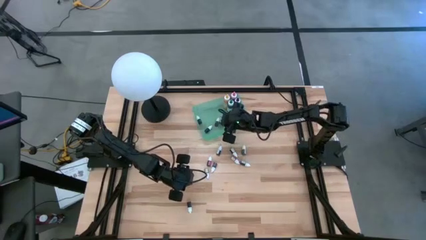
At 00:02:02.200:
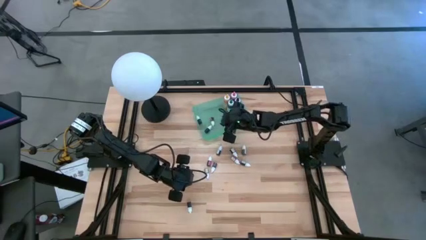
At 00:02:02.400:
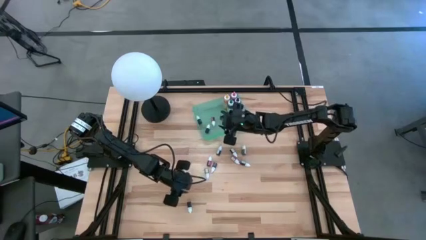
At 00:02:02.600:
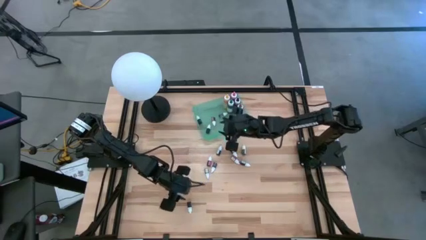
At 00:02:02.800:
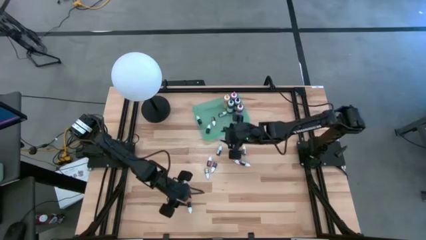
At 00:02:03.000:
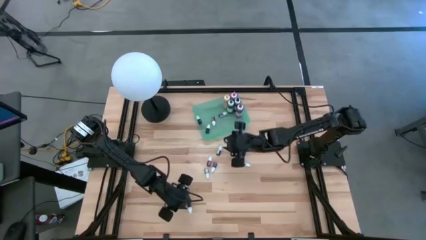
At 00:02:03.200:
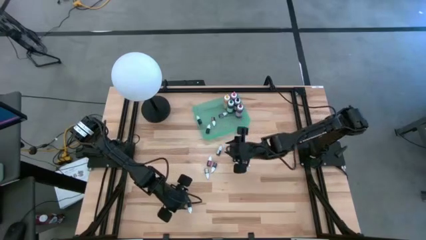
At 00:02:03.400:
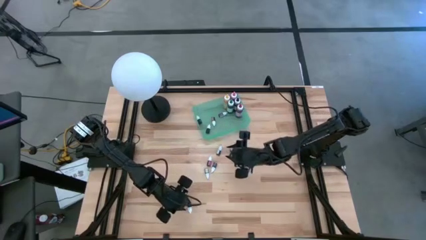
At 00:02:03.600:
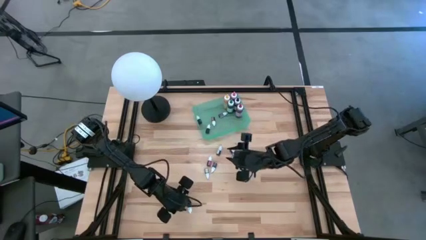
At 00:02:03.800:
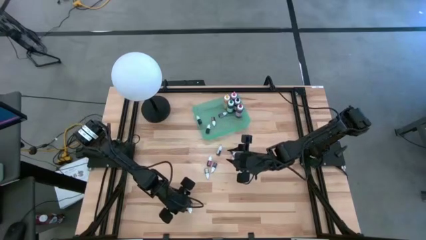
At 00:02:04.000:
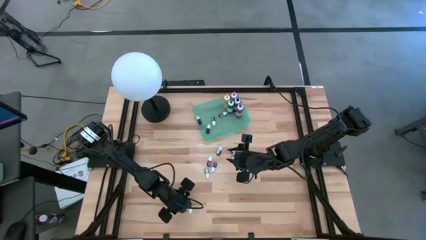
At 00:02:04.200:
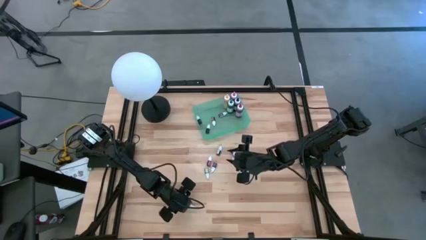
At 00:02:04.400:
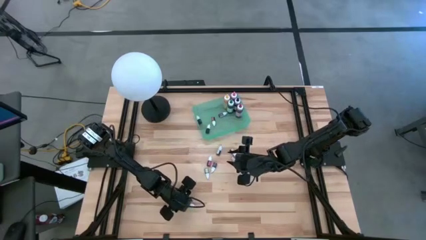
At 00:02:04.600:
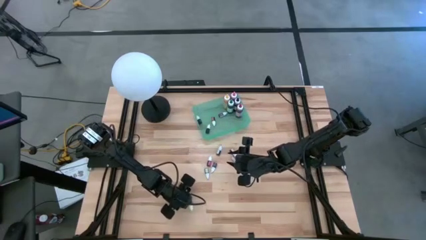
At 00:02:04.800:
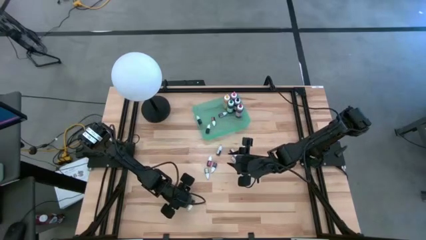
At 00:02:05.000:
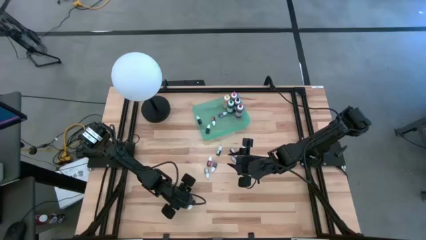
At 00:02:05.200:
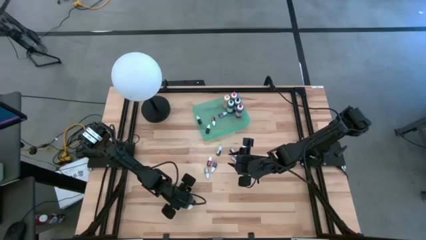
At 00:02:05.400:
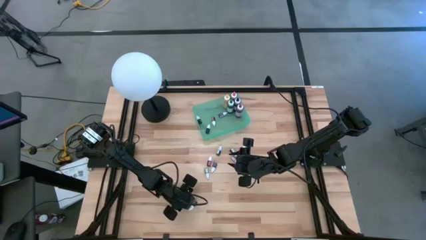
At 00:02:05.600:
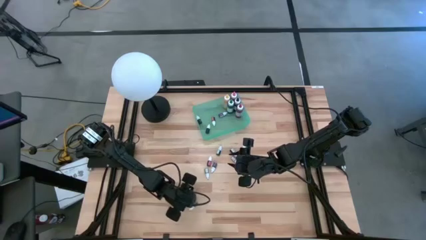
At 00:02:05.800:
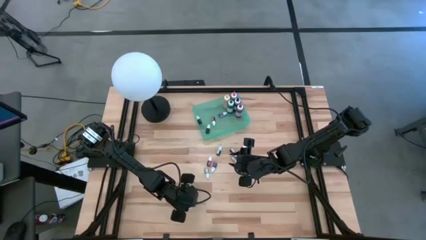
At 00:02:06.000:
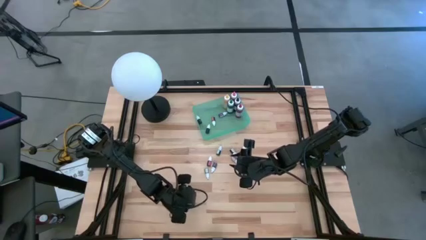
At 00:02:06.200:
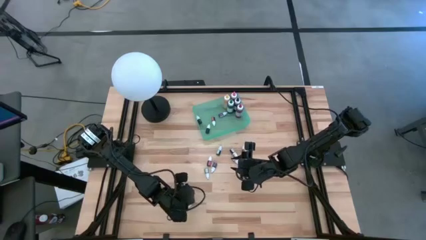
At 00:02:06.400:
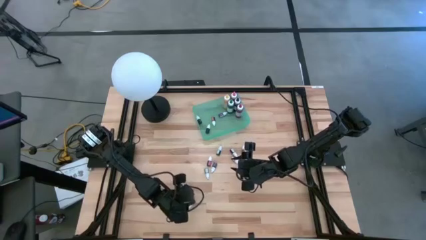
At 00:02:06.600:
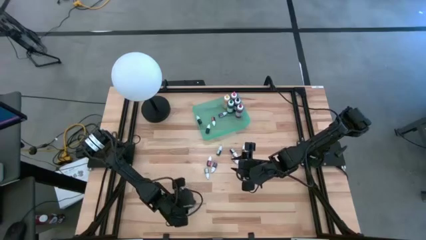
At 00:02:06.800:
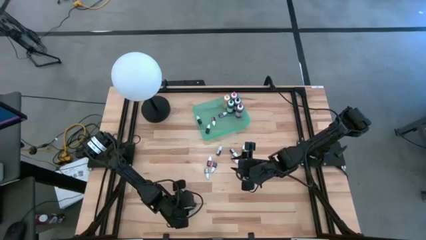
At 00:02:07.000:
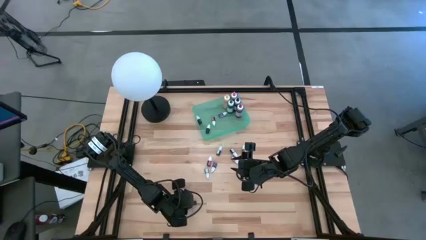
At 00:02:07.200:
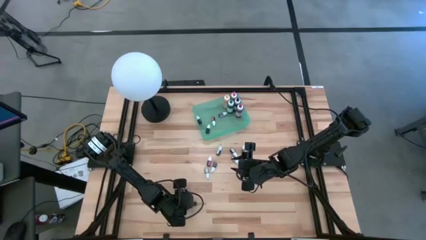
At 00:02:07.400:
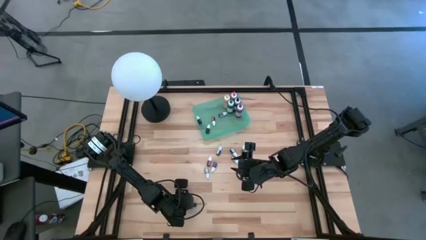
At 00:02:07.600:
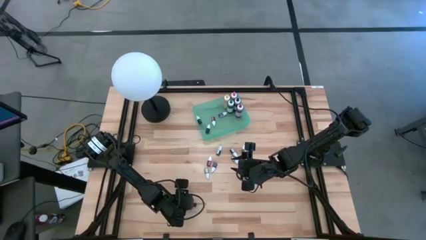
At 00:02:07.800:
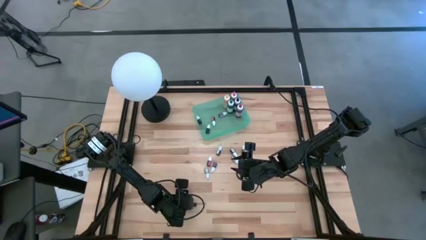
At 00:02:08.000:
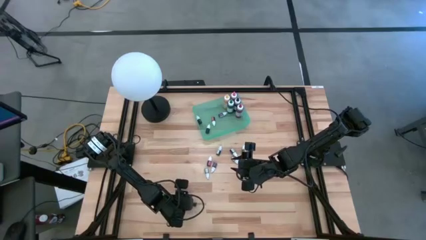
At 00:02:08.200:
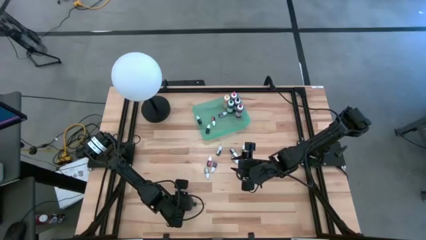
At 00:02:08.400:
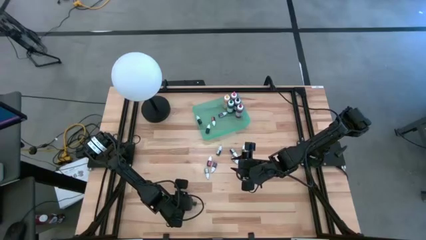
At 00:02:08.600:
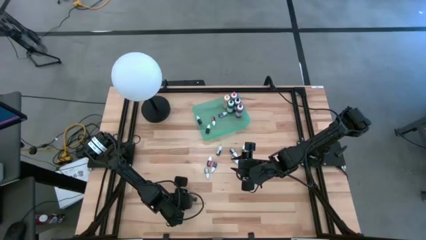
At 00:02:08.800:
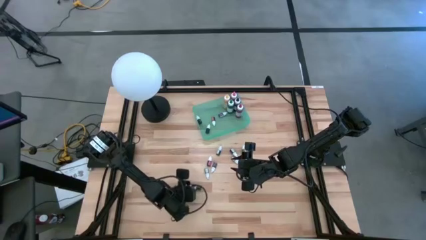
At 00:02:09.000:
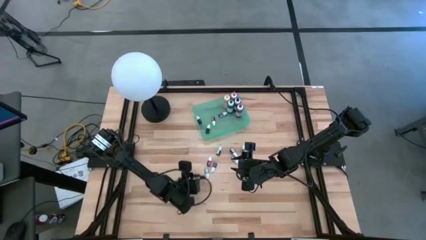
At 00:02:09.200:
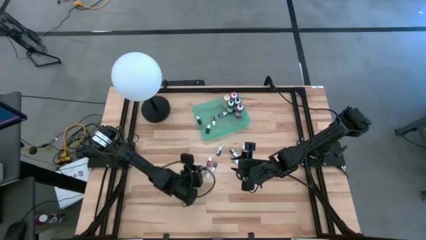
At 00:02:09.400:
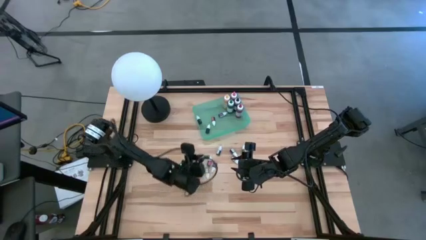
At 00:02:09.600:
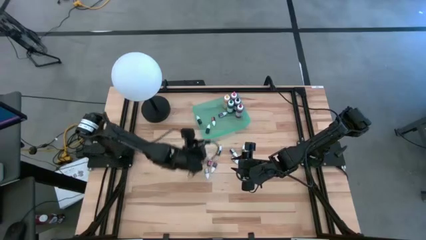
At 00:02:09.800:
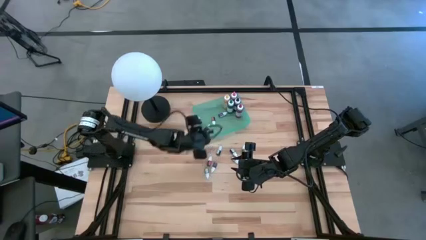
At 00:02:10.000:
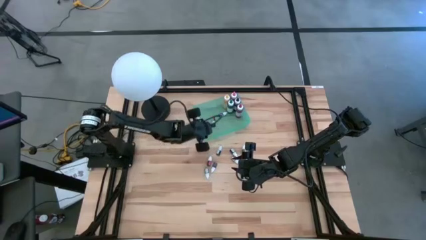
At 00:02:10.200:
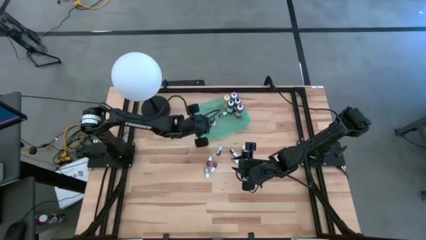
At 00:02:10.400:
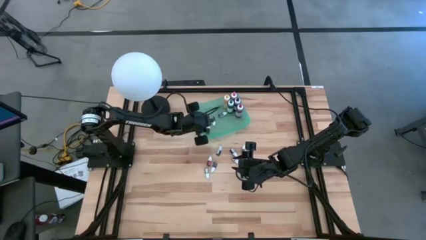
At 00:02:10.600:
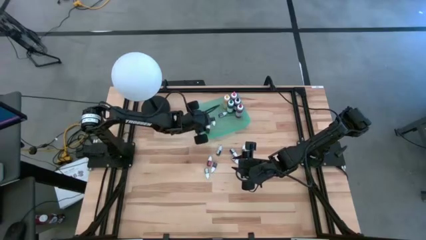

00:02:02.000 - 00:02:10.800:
Task: Pick & Place food coloring
Put the green food coloring bottle into the green bin

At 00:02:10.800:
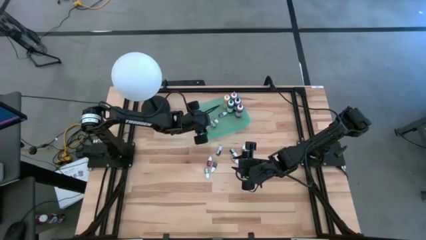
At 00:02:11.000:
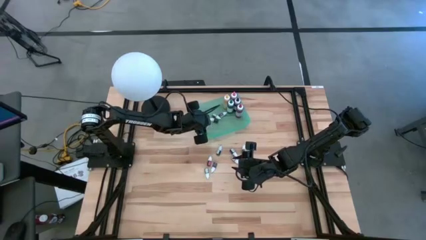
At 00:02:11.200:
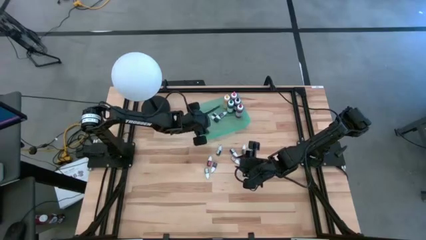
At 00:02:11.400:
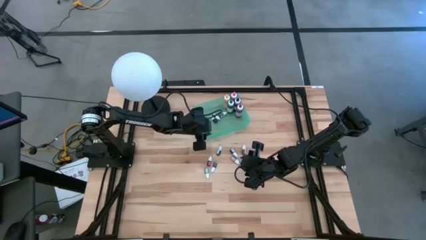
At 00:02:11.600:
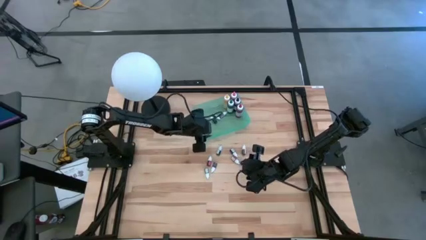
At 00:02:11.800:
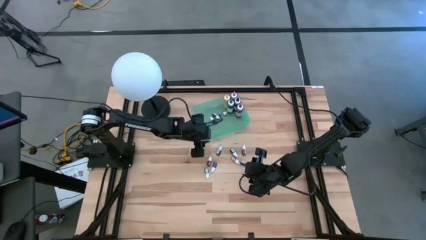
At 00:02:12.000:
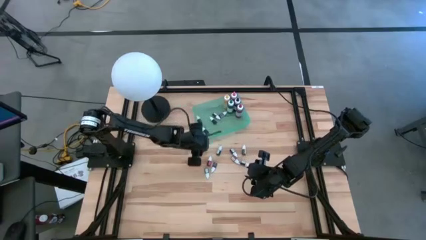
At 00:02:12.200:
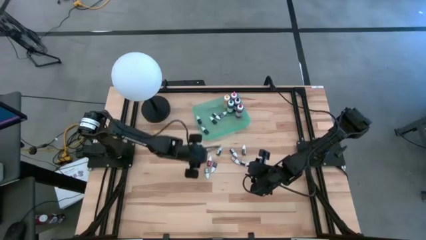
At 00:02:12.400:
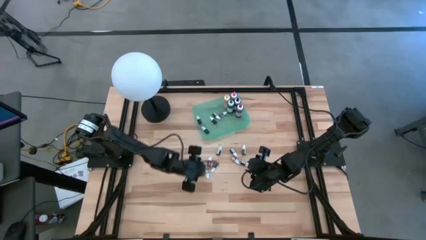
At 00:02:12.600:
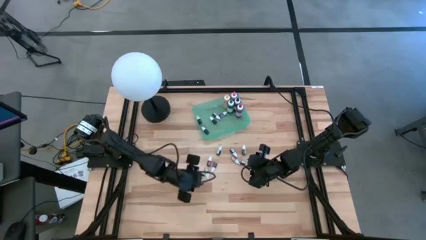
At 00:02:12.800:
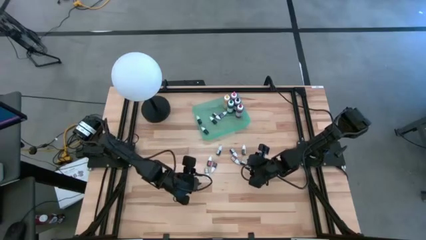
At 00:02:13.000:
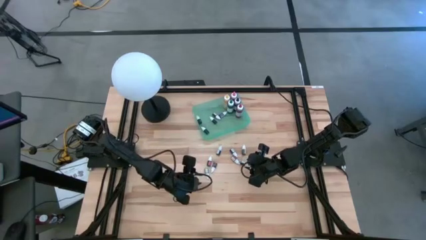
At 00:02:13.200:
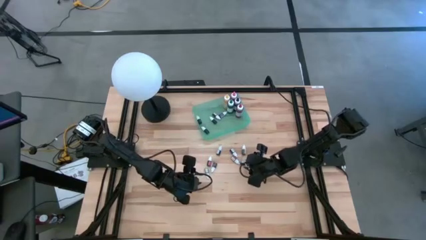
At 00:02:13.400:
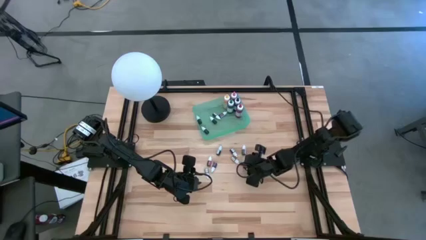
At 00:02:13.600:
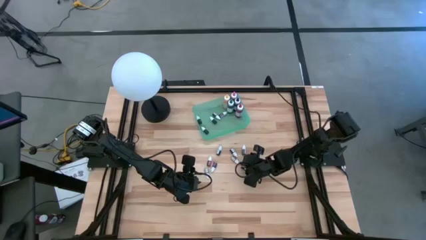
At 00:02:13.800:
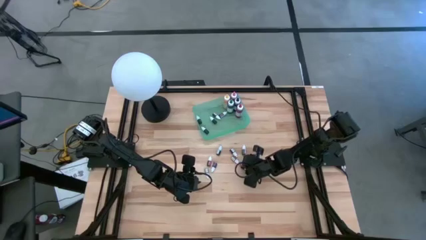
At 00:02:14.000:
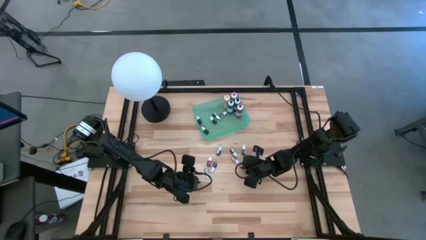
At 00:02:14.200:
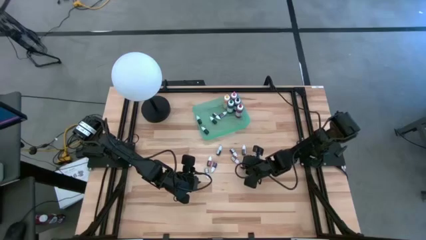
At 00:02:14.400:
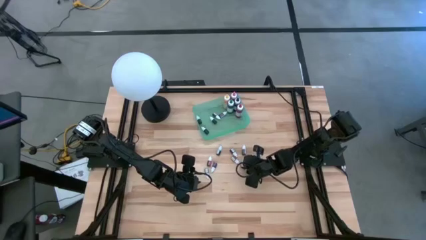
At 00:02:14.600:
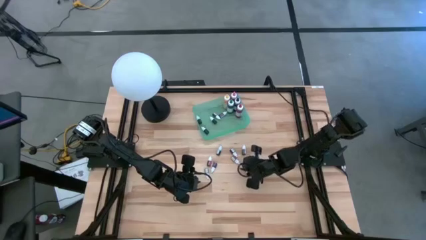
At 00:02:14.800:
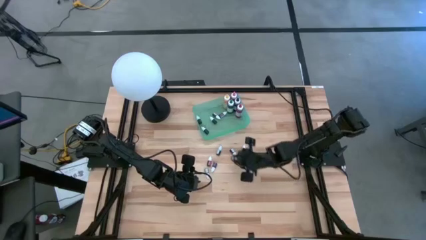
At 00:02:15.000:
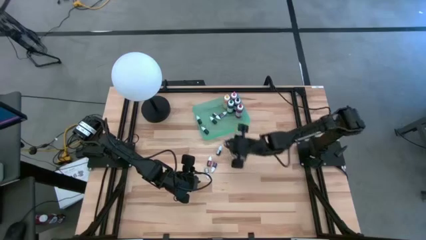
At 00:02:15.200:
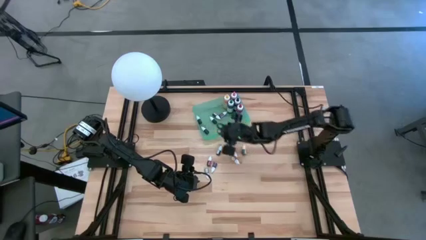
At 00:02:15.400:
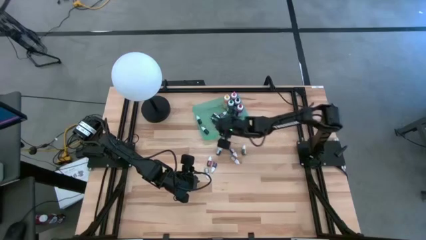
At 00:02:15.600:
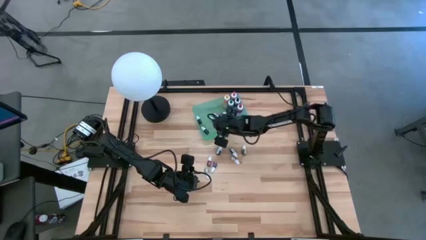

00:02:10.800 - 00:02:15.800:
Put the black food coloring bottle into the green bin

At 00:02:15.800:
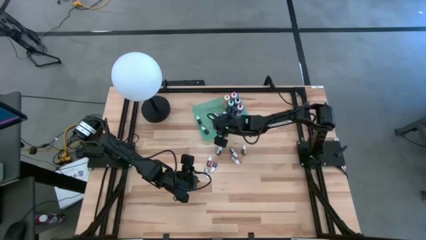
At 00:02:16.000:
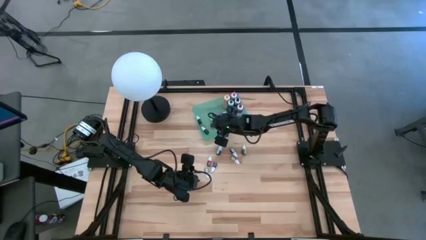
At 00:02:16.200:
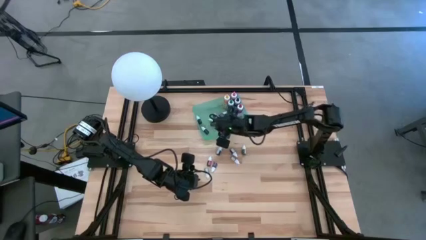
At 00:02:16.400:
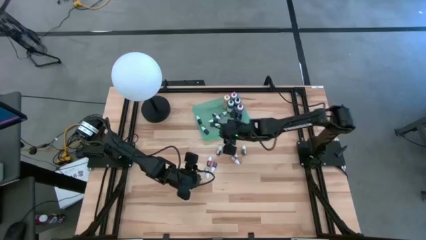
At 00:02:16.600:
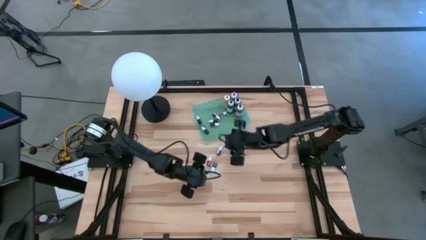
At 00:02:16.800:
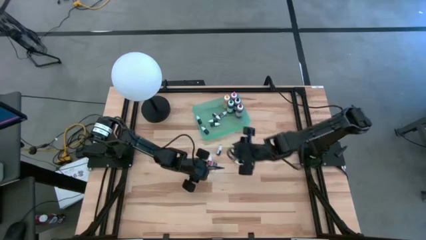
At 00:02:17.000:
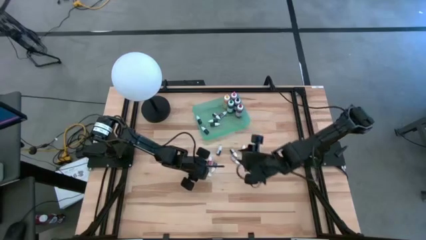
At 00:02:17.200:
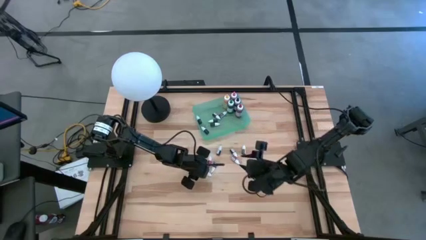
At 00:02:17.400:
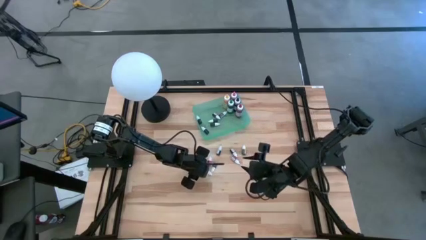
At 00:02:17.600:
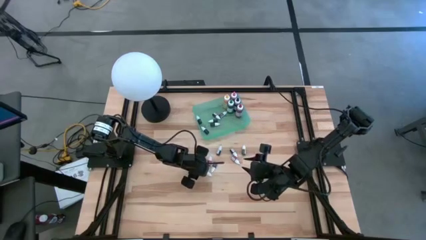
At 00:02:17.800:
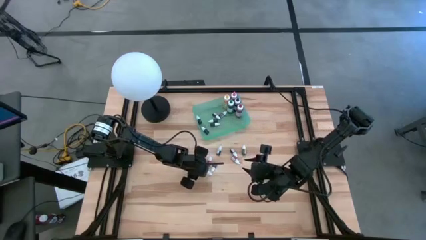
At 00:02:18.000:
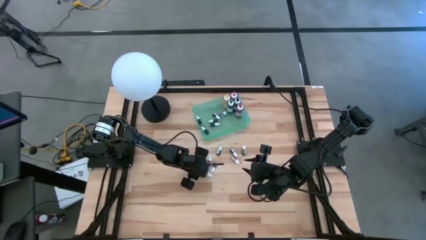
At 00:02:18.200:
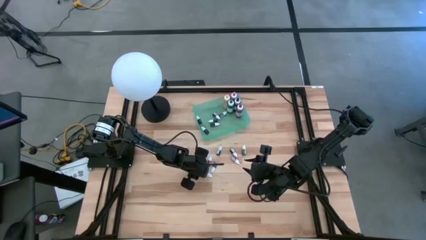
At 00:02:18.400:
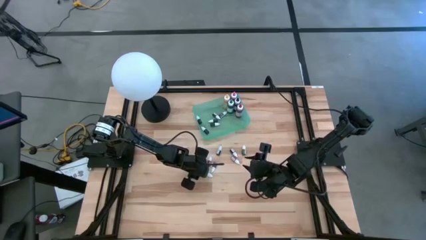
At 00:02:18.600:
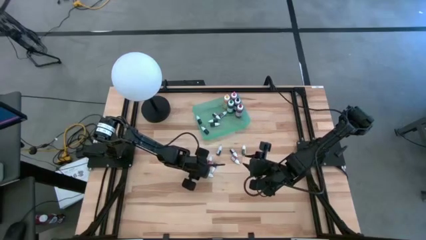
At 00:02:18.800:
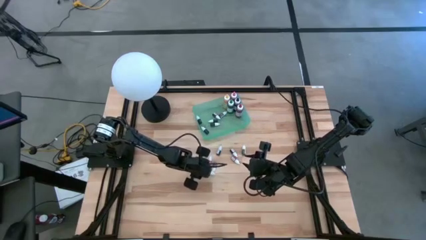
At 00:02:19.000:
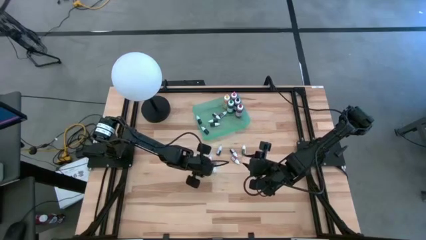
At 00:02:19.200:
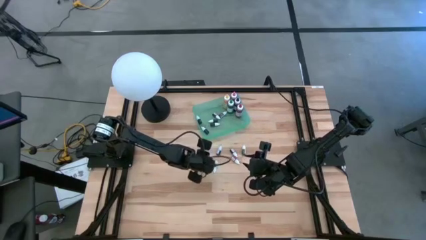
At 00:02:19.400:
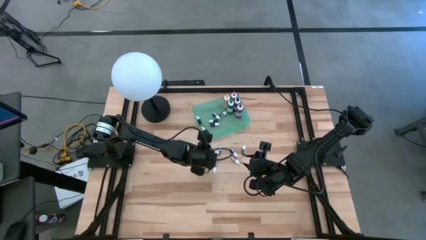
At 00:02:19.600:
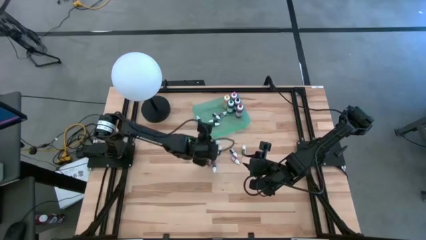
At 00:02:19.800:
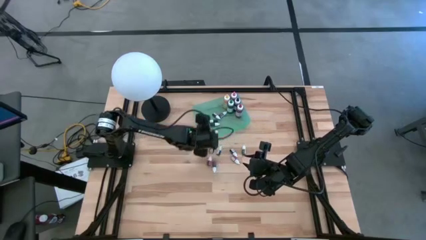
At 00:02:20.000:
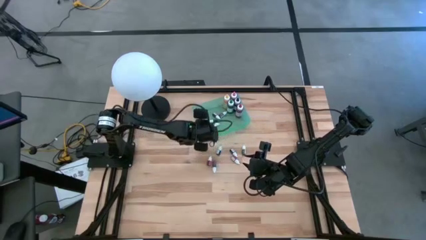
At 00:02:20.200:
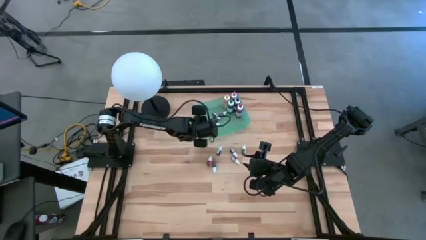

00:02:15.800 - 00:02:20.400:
Put the black food coloring bottle into the green bin
